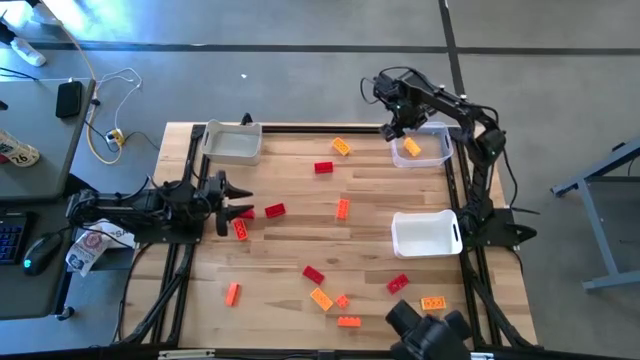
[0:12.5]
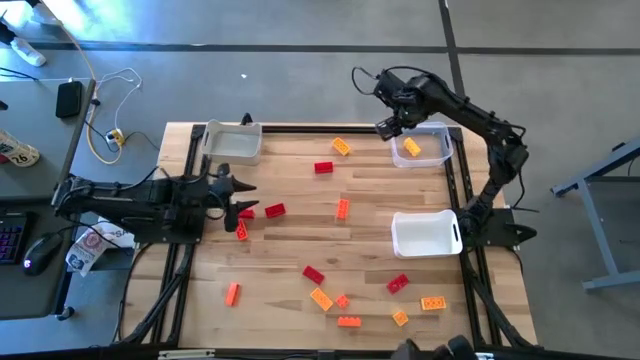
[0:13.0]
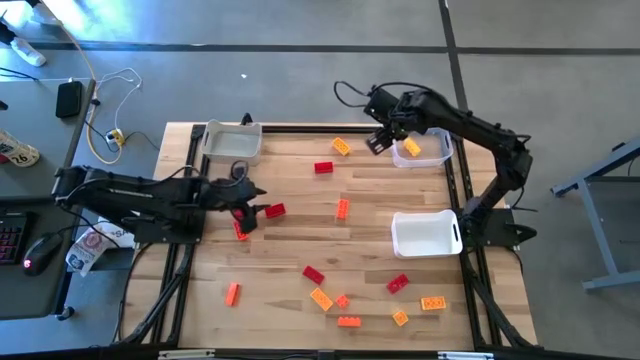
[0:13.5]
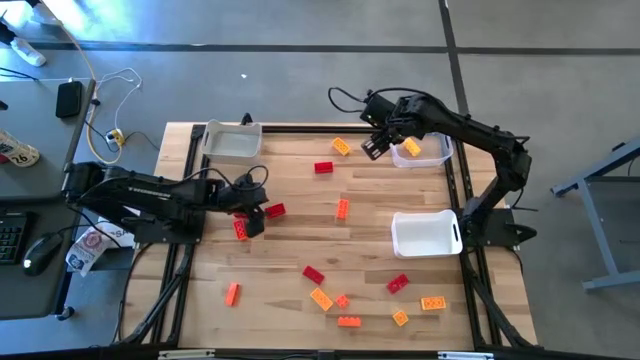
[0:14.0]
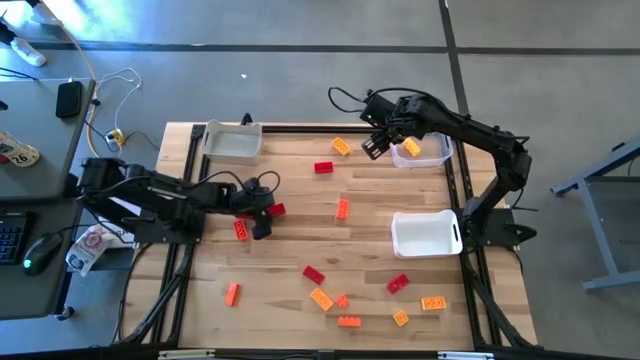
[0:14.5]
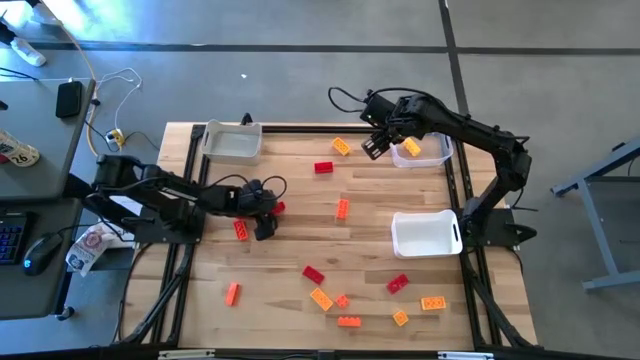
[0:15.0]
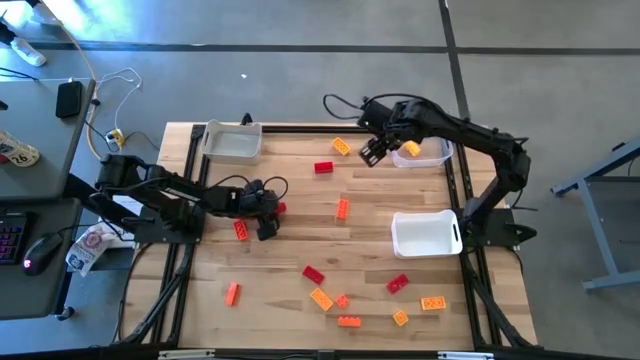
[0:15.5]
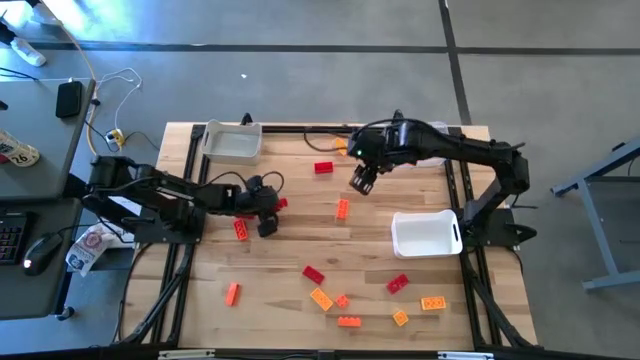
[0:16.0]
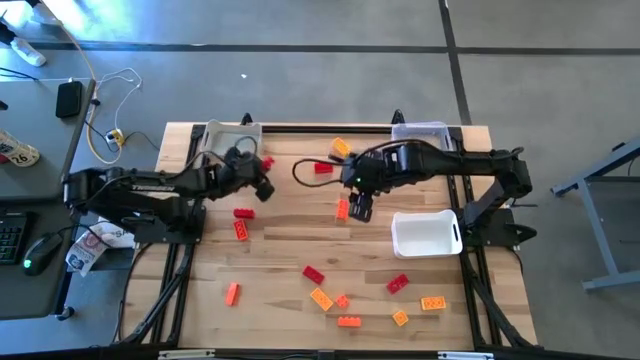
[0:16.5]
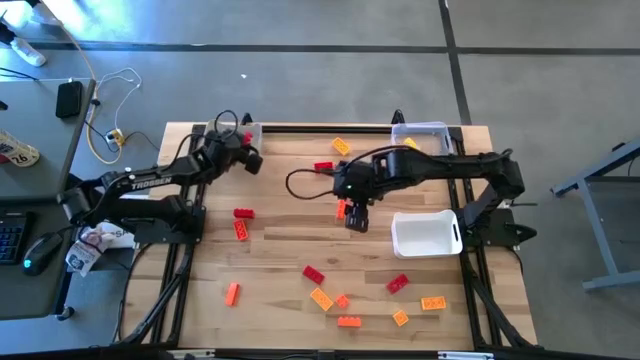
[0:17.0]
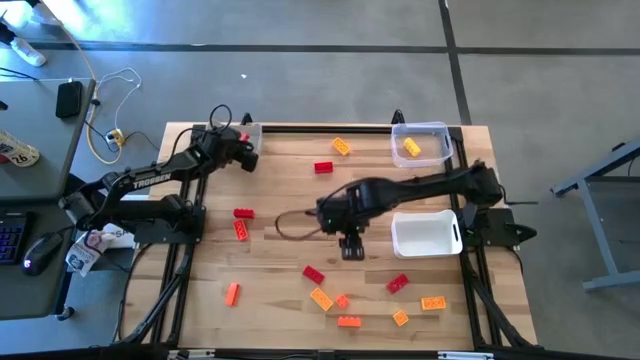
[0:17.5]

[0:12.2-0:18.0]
Task: Sort & place blocks by color
Put the red game piece into the gray bin

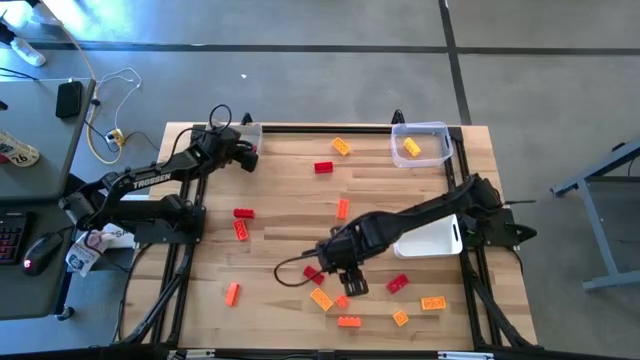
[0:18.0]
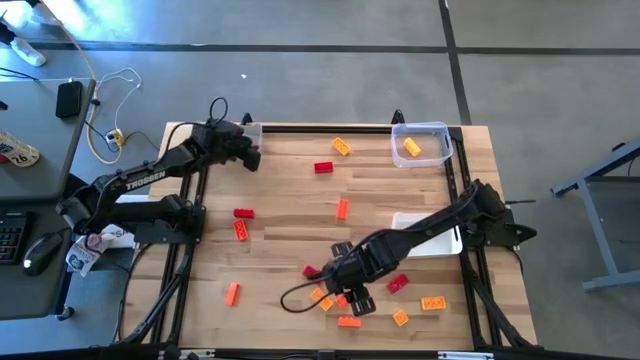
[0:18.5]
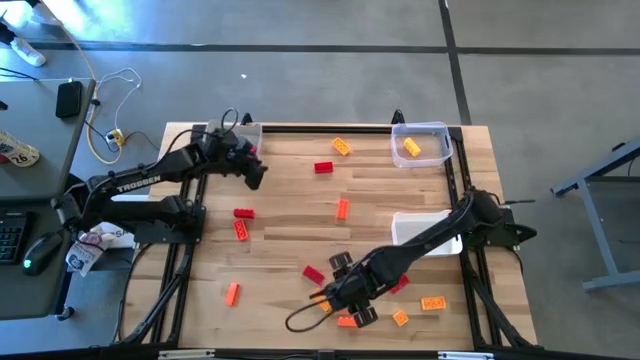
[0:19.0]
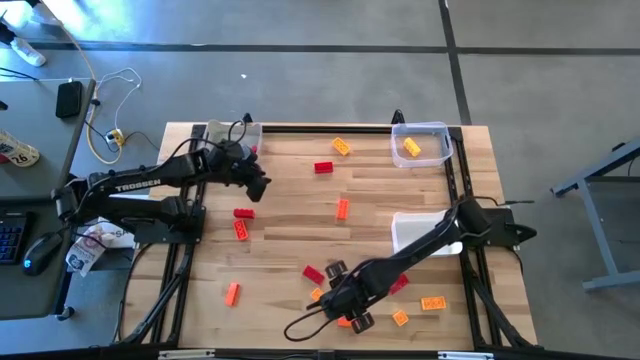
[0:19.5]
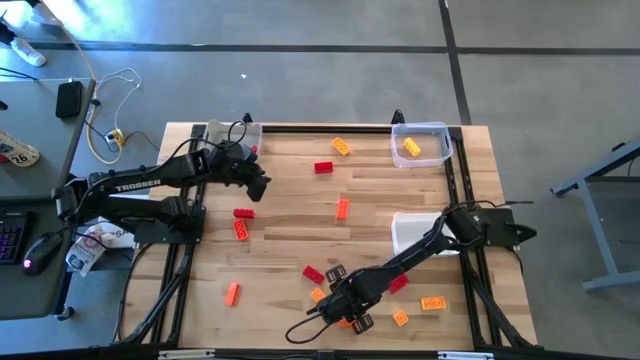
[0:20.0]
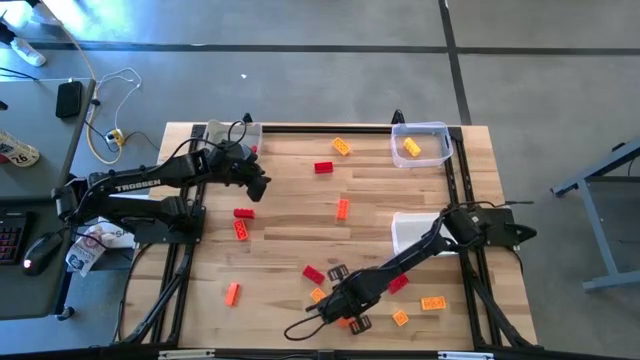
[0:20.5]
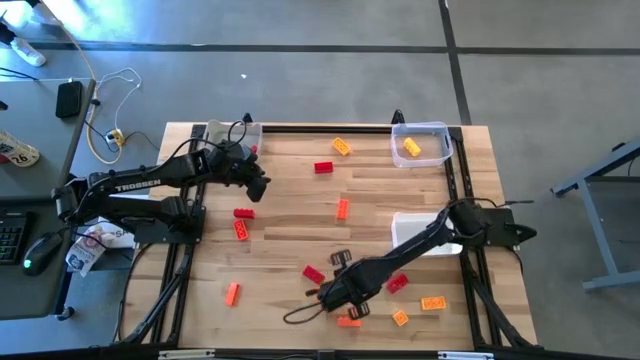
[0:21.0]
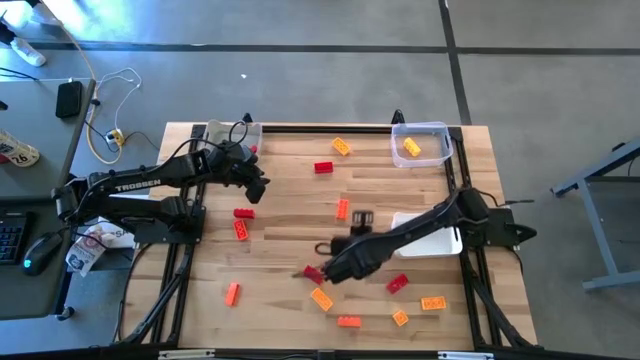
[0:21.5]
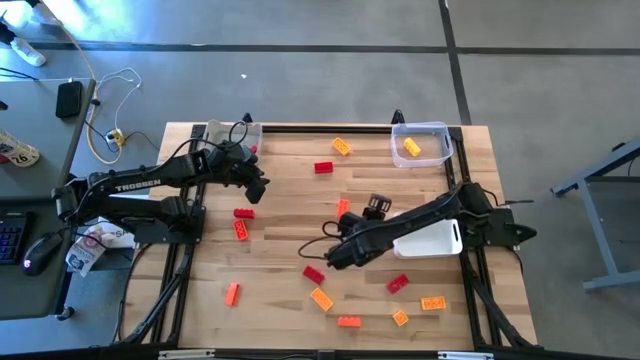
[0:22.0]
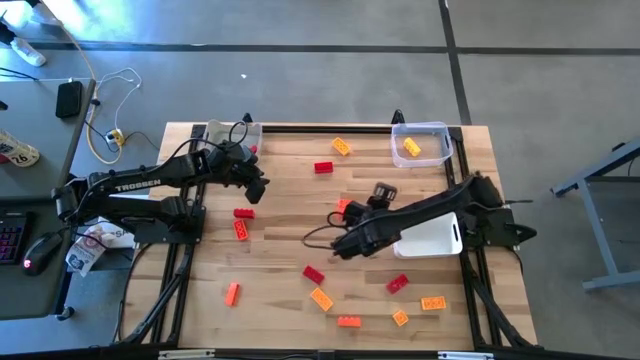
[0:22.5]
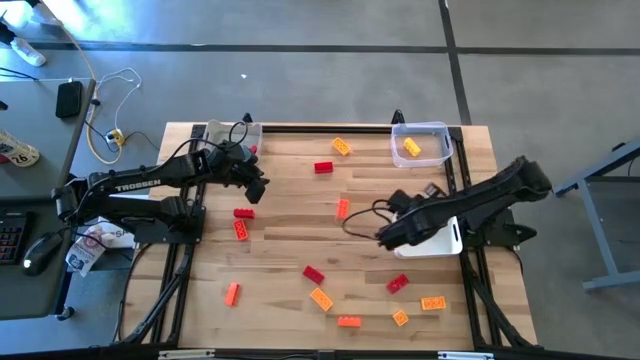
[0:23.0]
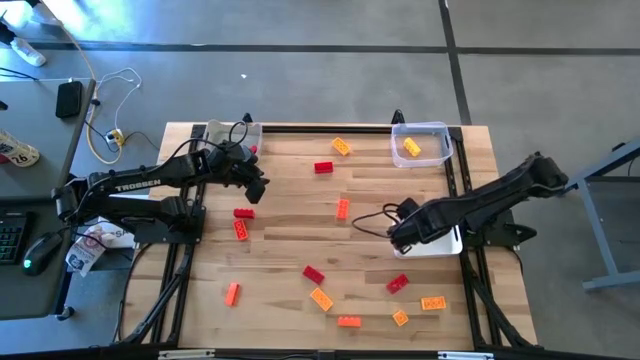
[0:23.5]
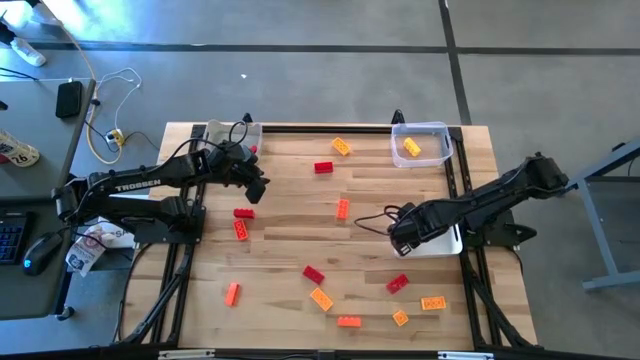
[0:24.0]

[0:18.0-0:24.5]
Put the orange game piece into the white bin

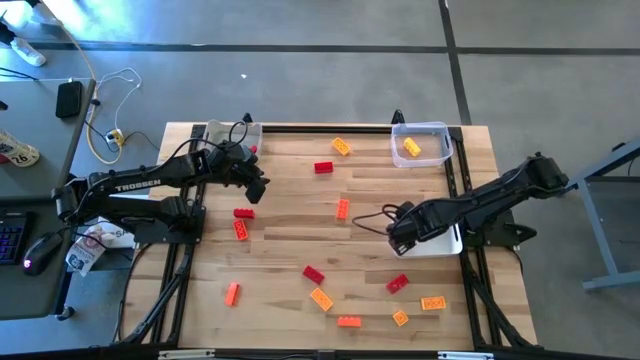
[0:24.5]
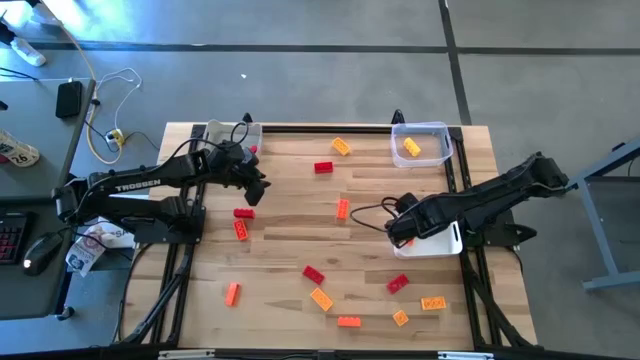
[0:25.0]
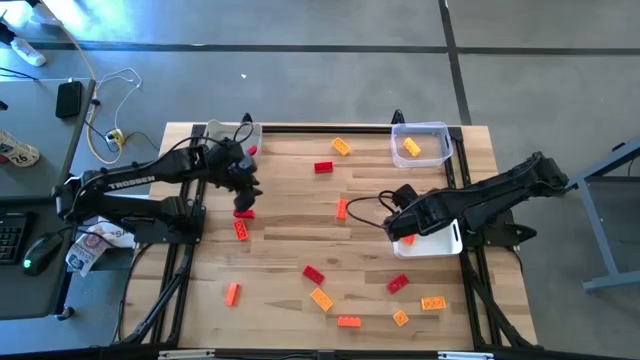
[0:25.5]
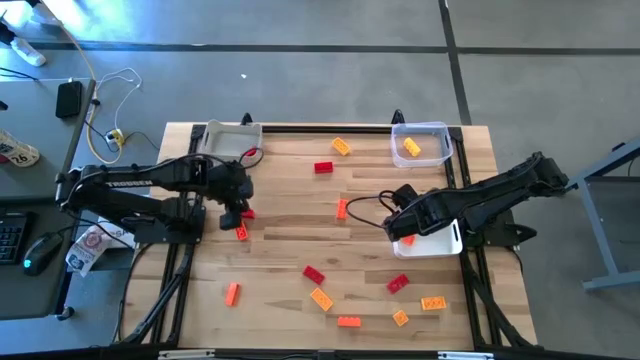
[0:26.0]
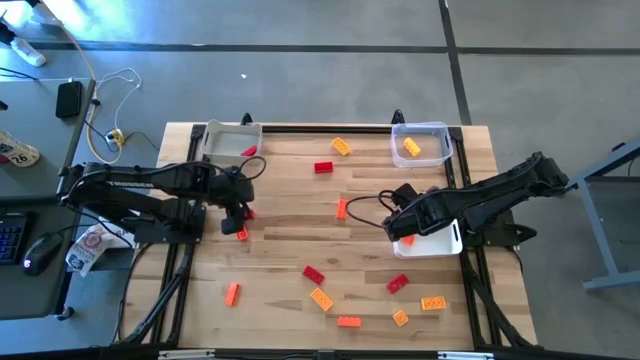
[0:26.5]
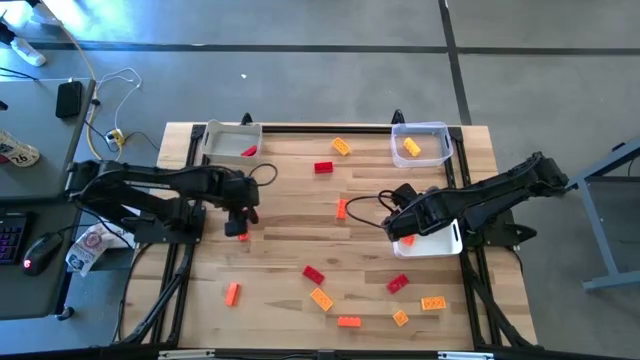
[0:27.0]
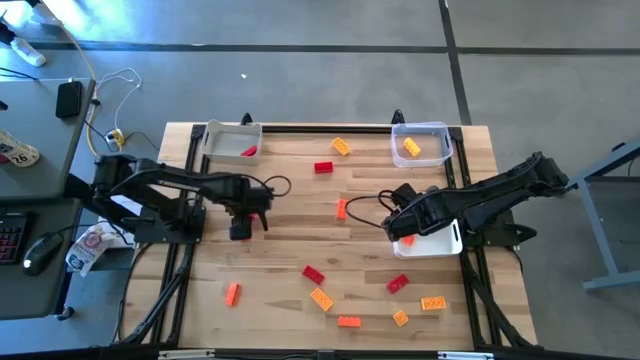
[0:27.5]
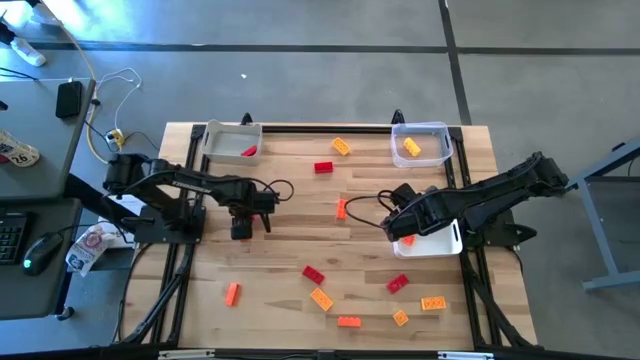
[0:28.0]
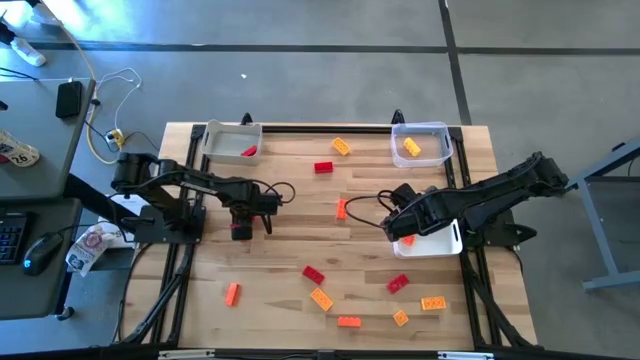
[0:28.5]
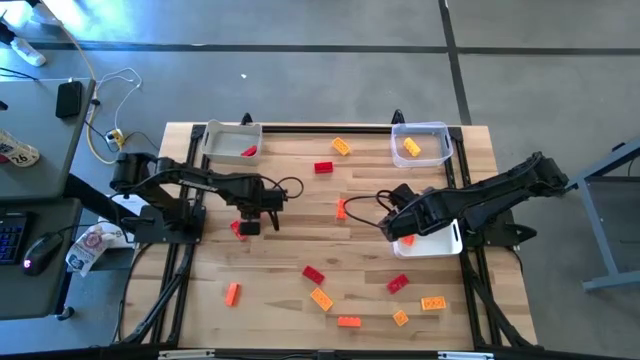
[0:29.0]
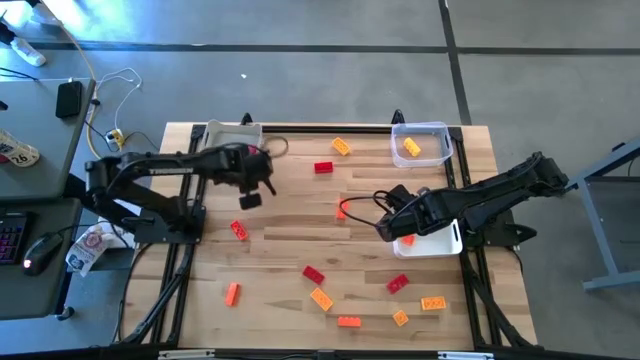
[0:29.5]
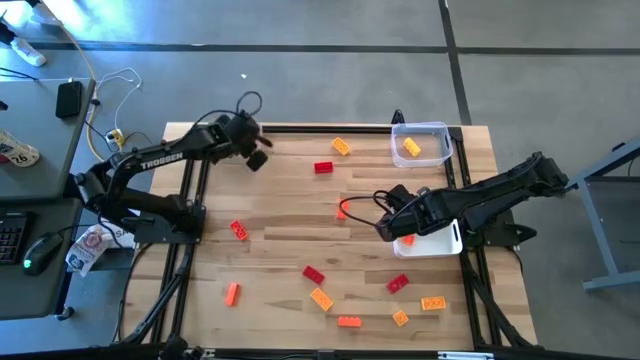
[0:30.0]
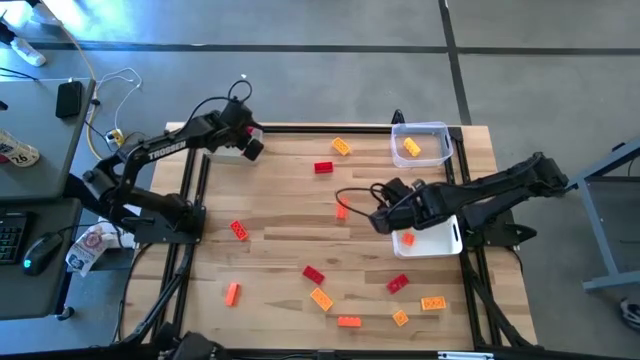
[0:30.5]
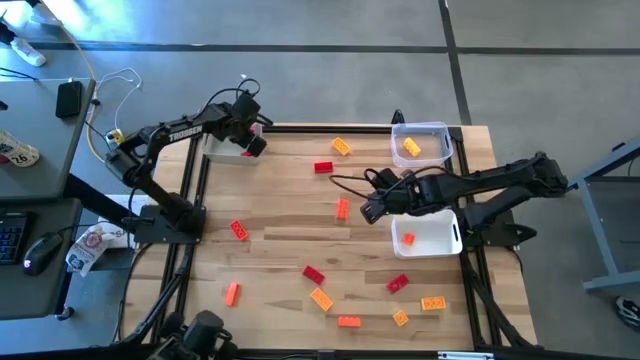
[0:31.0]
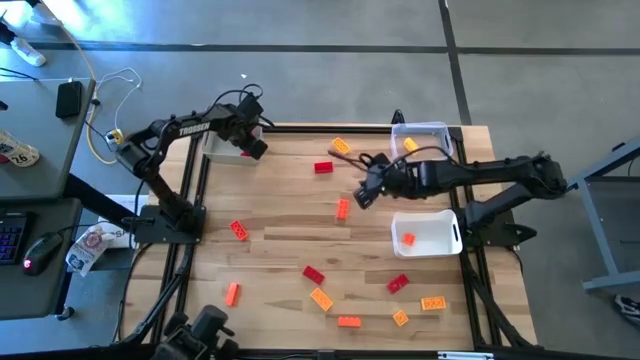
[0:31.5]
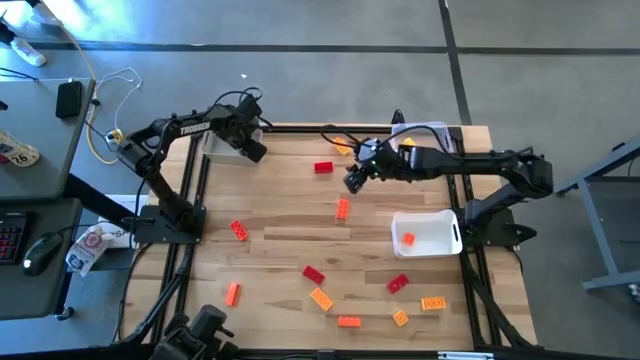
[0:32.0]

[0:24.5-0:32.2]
Put the red game piece into the gray bin
